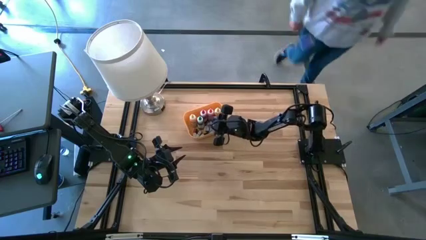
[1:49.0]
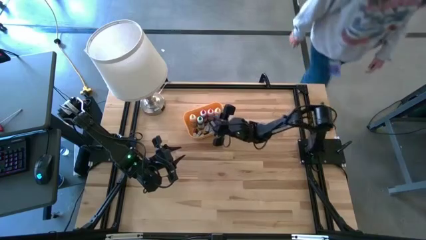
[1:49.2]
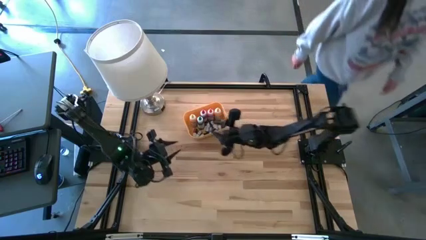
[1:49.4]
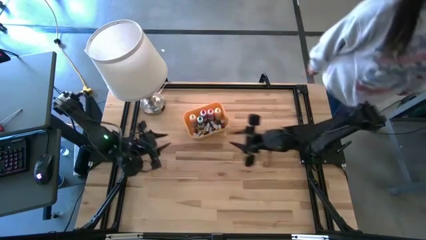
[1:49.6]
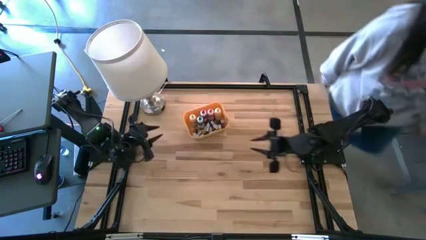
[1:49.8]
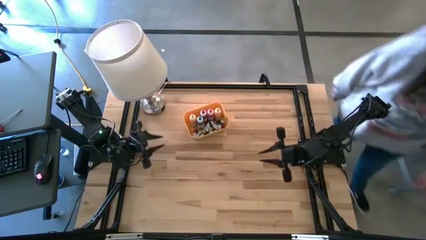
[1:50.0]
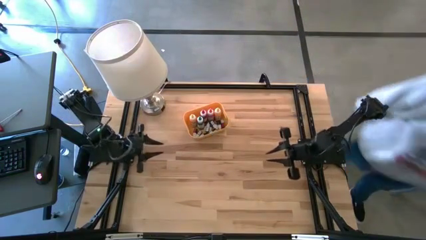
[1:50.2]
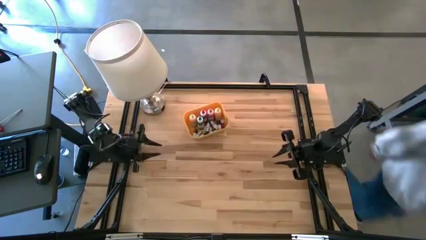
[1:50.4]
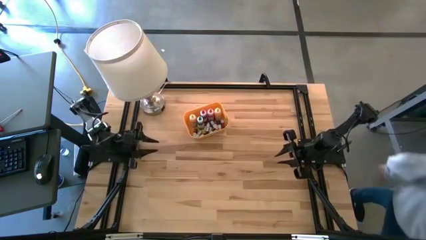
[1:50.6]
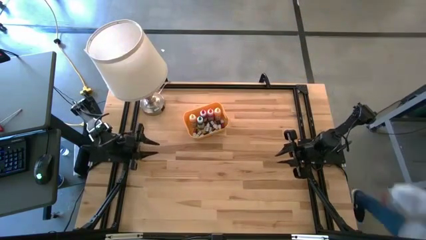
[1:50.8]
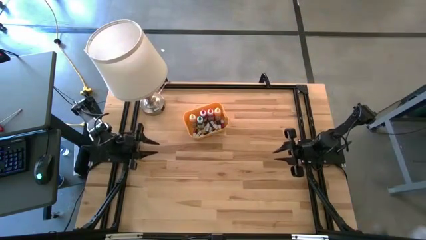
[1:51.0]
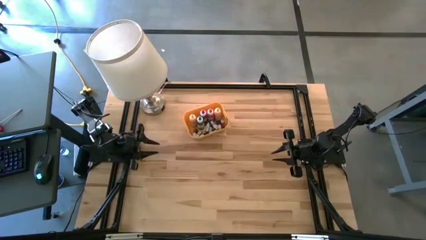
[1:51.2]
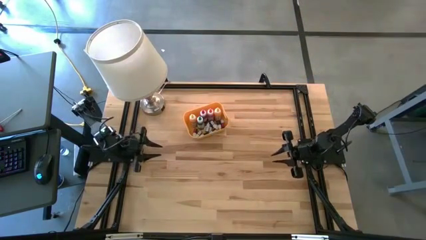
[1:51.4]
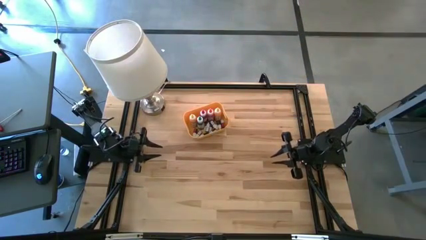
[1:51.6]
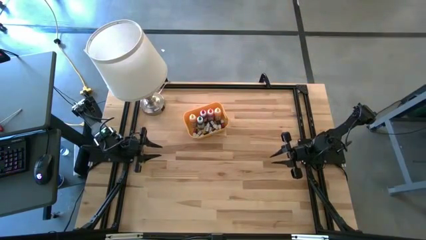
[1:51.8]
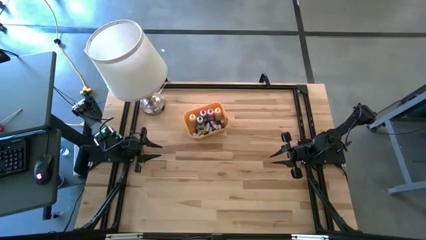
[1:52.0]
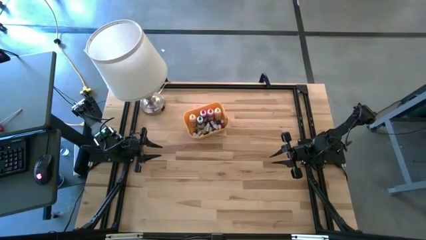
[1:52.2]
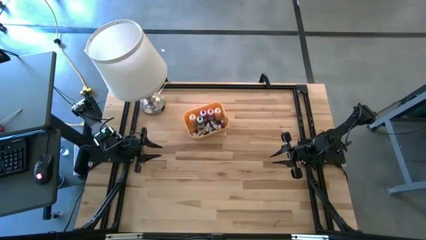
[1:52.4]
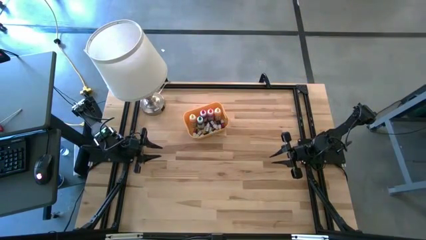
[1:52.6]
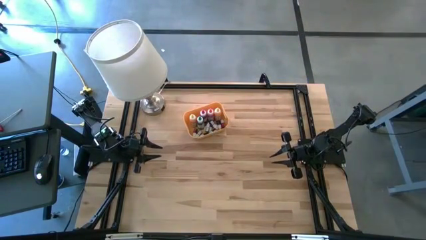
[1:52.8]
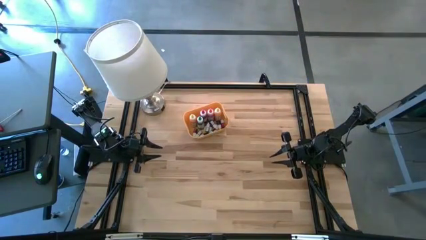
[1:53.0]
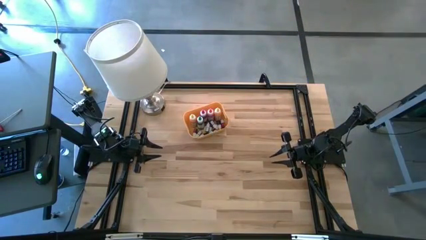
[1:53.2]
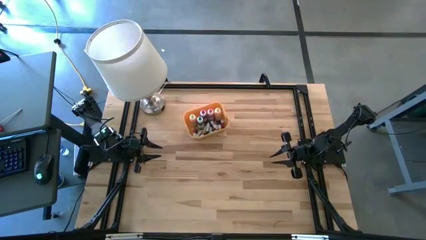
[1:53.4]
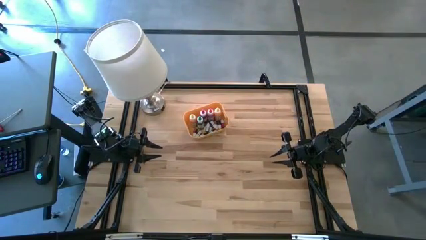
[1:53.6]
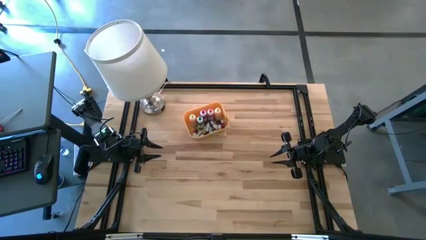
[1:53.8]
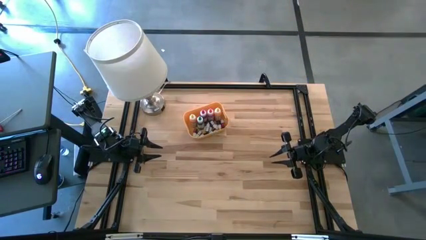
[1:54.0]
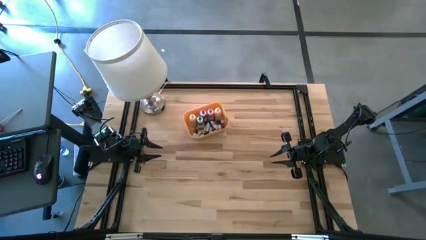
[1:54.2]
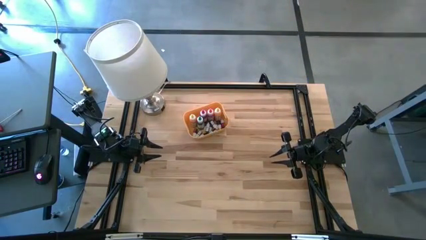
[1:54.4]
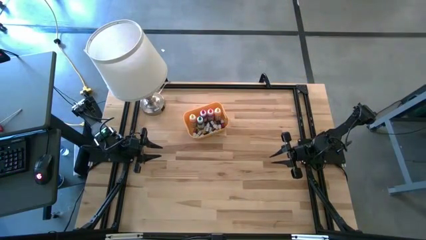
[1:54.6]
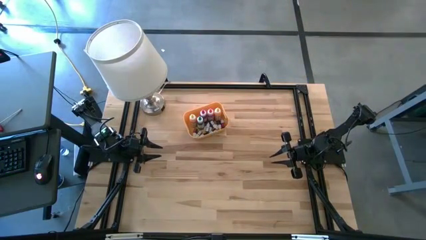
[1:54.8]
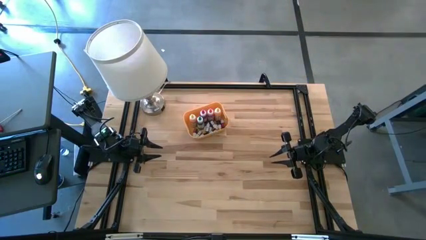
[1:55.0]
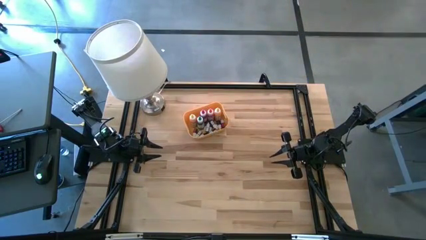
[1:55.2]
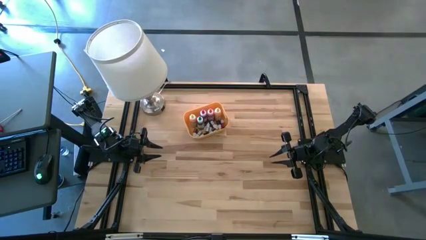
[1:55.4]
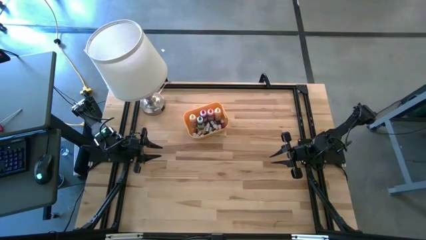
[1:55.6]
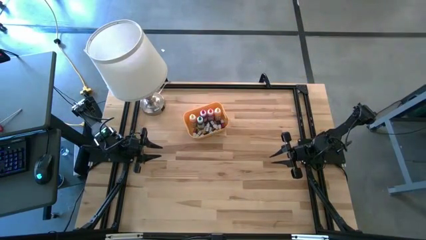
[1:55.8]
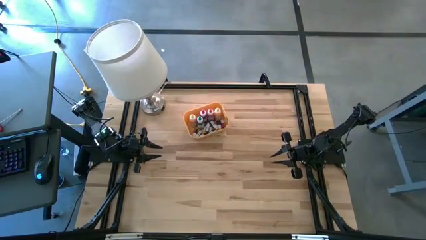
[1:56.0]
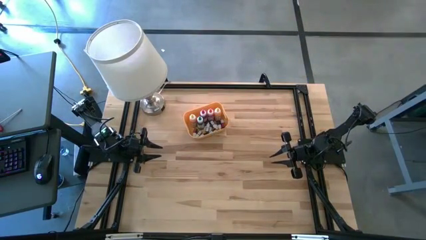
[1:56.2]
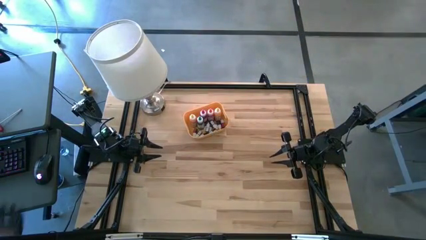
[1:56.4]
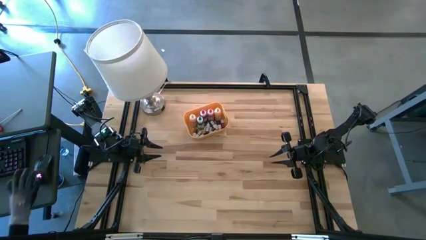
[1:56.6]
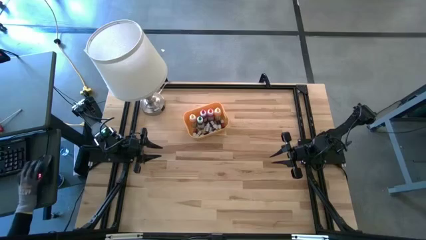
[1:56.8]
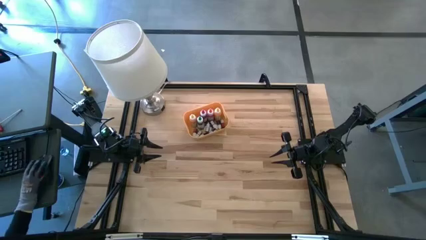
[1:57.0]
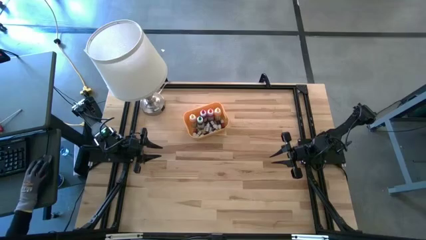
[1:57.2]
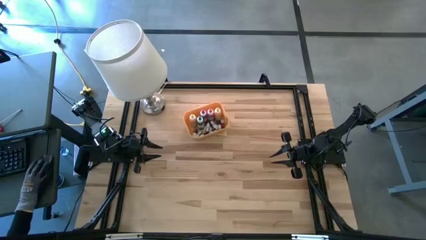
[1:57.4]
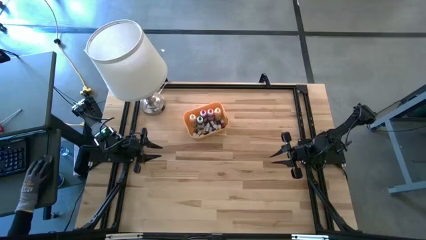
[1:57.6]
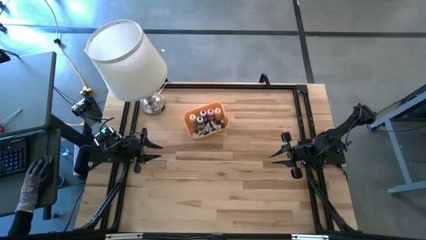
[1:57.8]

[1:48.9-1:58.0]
Task: Pick & Place food coloring
Return to Home Position

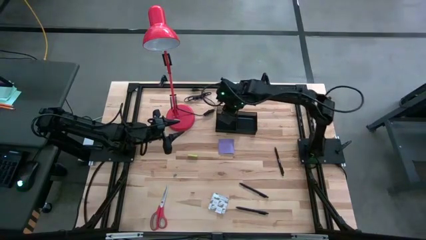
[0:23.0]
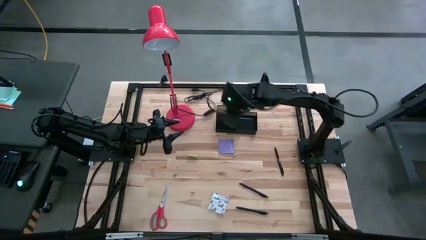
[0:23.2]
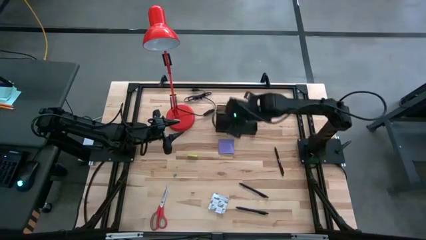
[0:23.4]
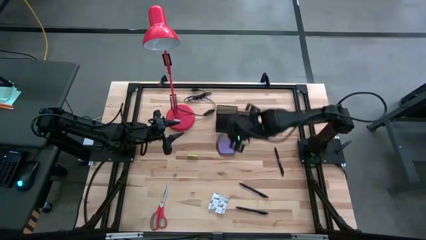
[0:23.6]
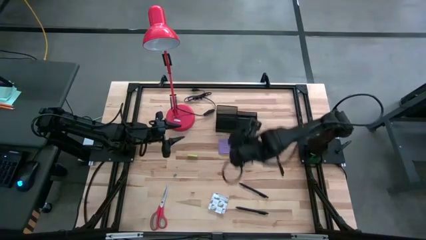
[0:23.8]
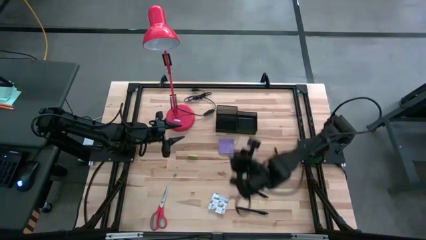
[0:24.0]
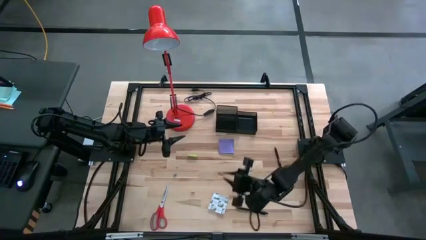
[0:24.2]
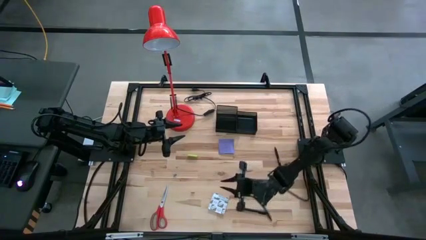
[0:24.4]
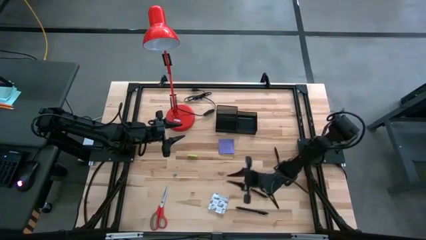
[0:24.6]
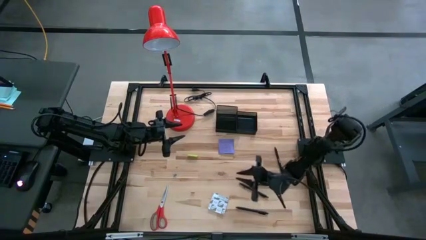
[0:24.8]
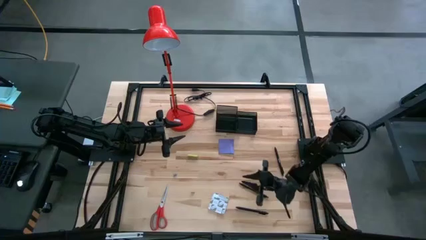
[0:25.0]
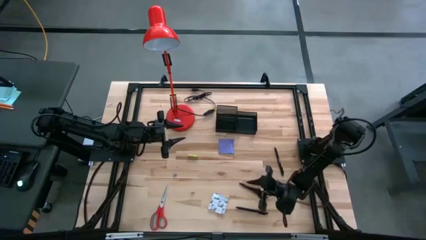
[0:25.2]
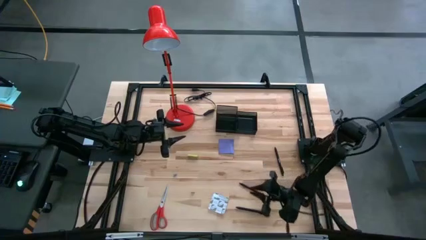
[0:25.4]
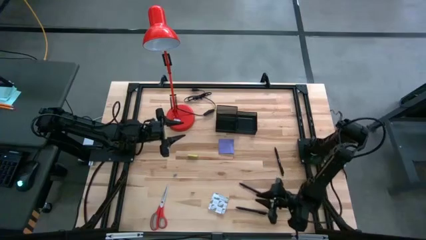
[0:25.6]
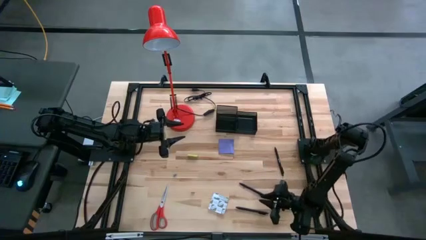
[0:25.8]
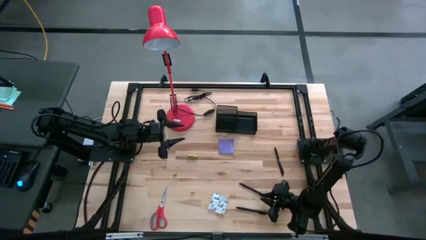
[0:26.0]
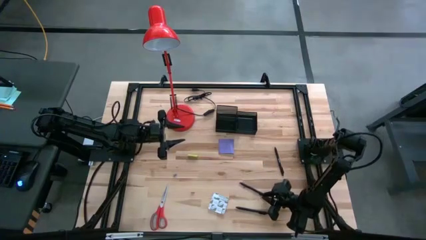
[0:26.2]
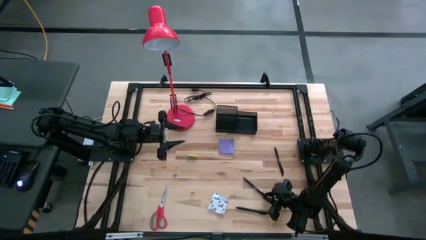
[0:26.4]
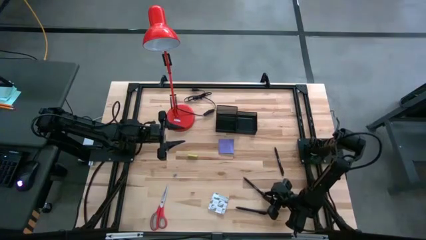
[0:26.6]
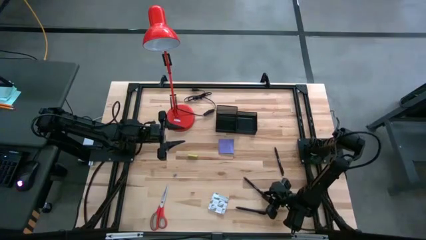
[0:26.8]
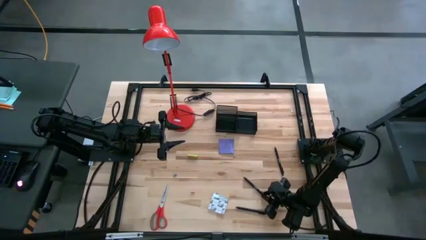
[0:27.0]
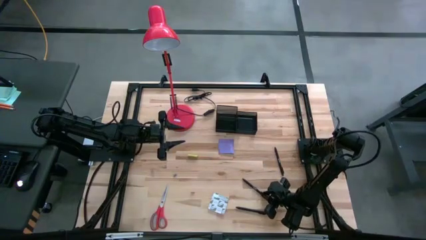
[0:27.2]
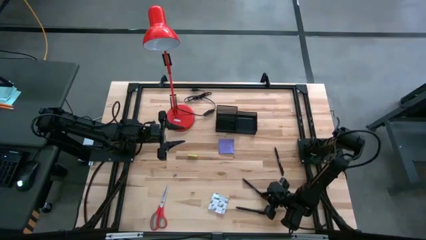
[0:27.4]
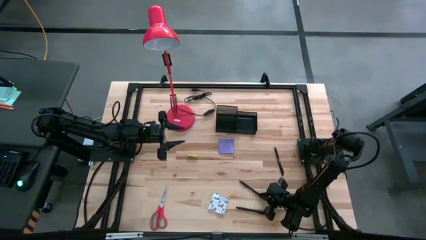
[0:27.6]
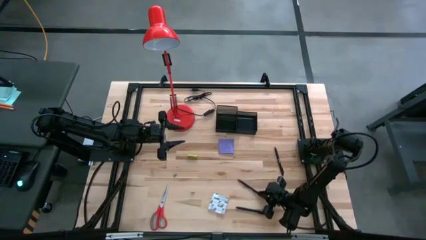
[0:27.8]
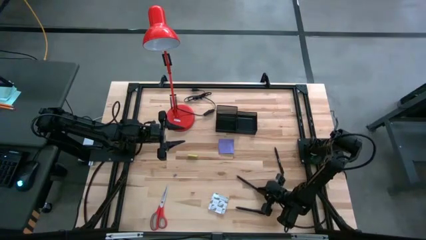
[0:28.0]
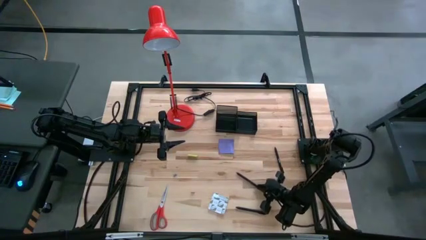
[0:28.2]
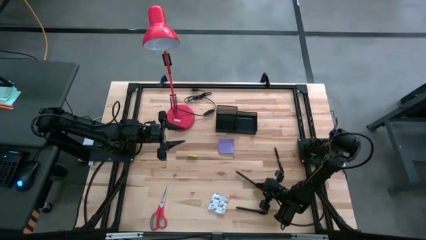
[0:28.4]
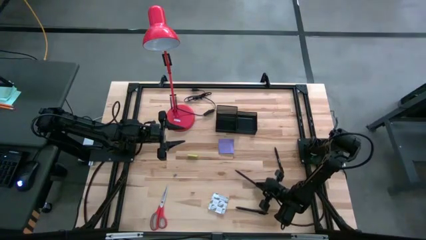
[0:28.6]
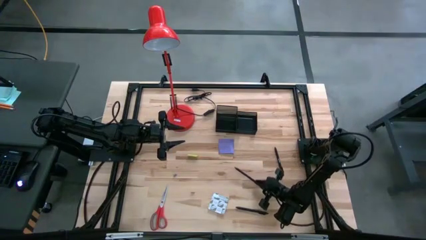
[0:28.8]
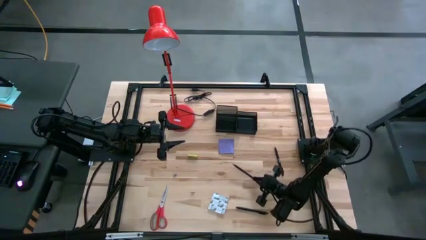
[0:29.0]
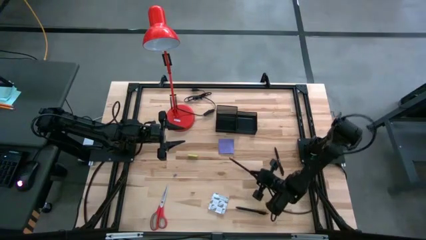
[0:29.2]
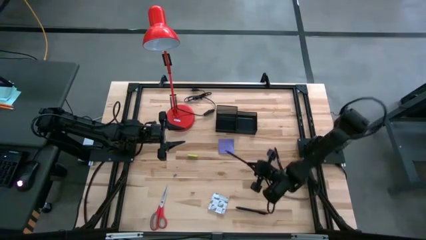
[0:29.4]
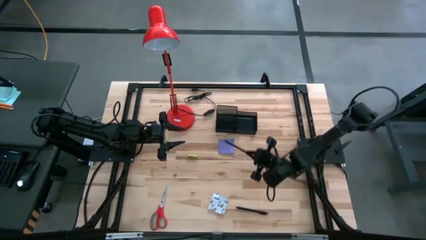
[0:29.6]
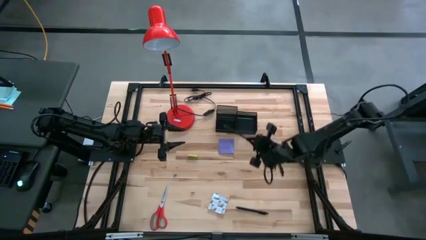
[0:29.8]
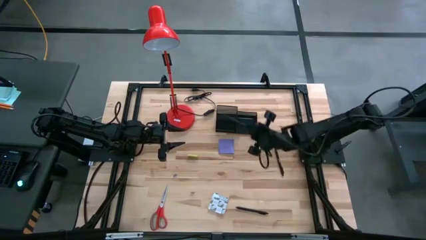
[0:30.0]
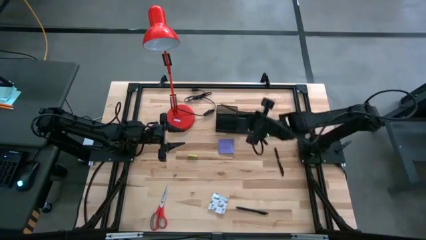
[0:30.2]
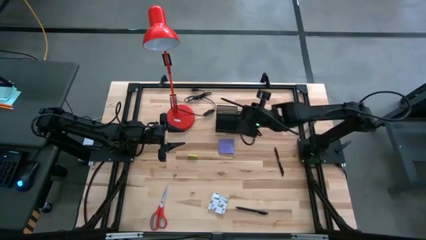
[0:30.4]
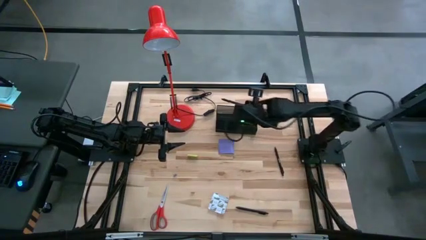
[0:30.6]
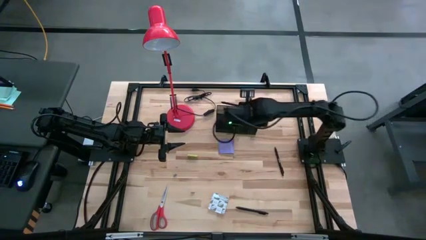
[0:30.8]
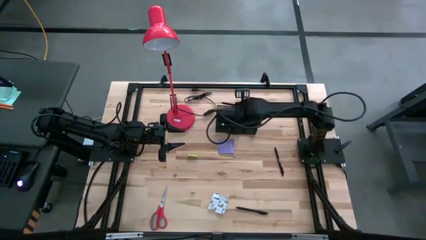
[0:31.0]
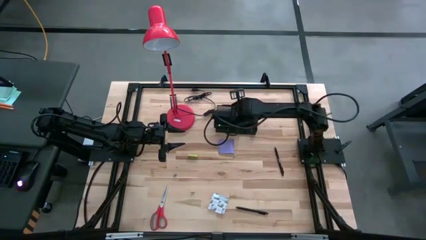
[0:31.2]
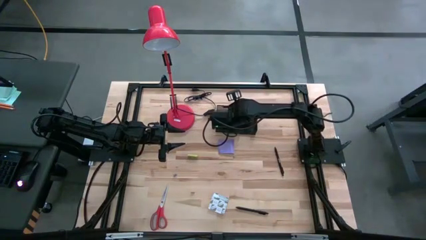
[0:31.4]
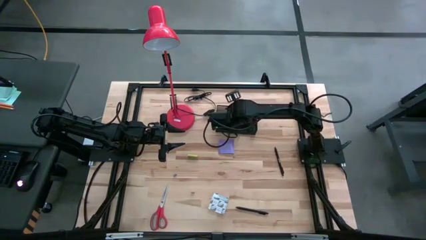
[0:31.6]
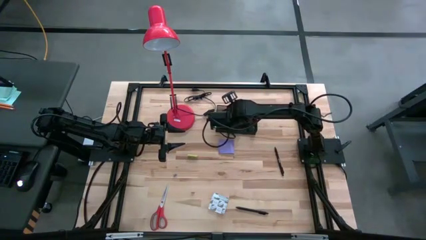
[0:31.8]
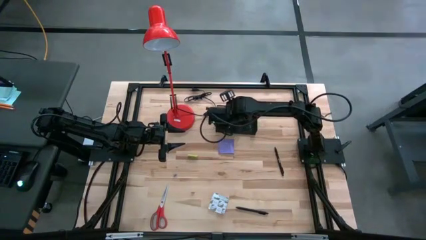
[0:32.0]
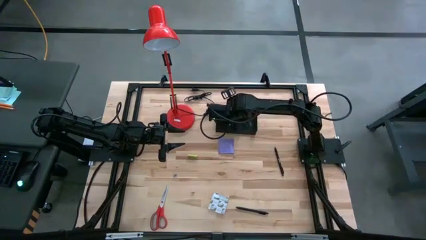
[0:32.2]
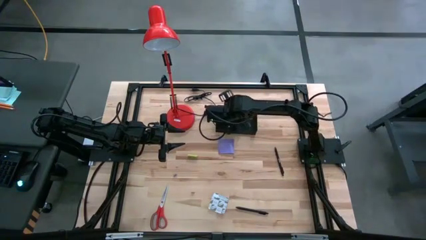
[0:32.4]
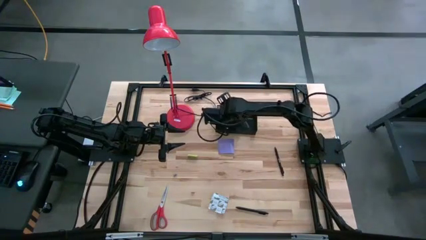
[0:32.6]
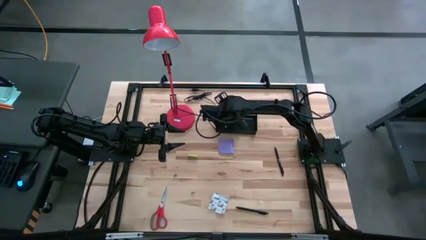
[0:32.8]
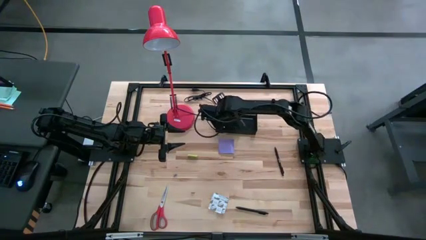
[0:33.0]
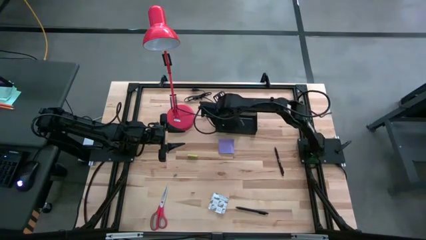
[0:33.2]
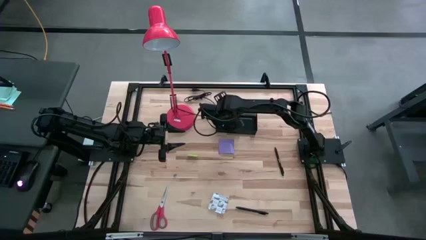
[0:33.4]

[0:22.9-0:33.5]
Task: Pick and place office supplies into organizer
Put the black pen into the black desk organizer
